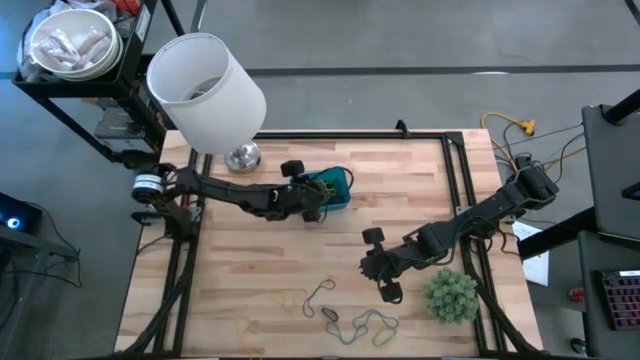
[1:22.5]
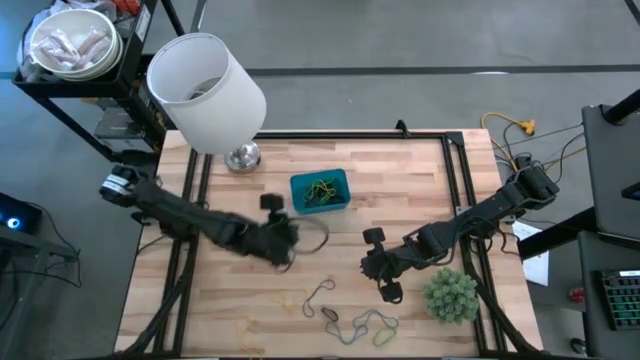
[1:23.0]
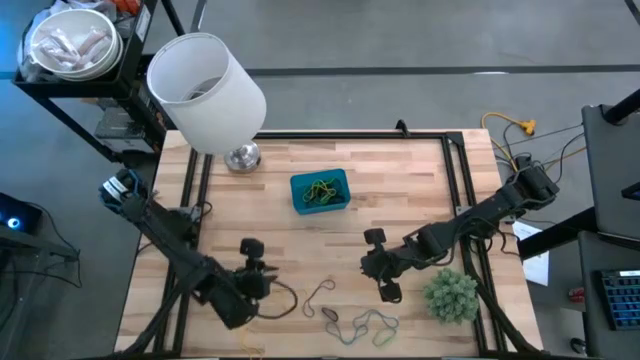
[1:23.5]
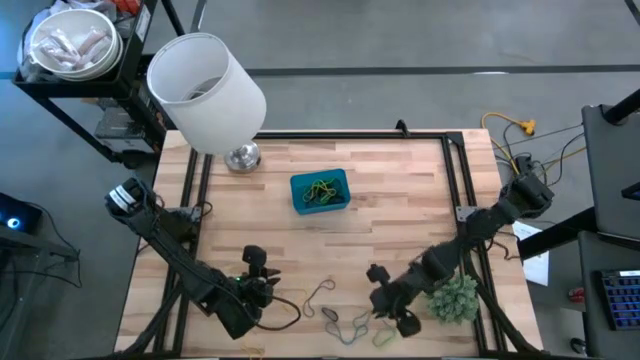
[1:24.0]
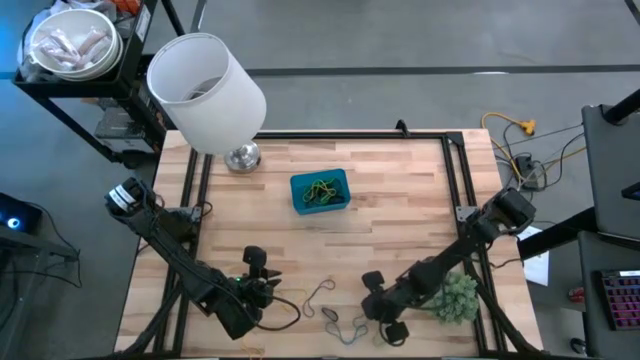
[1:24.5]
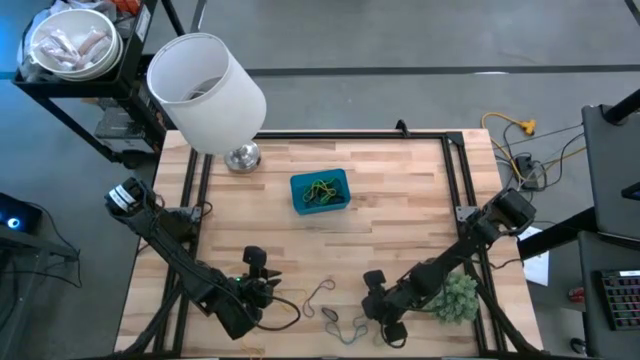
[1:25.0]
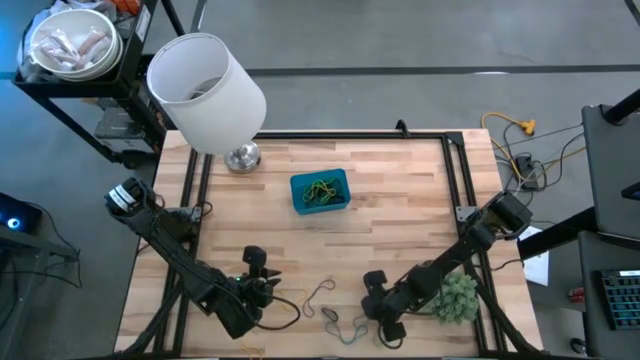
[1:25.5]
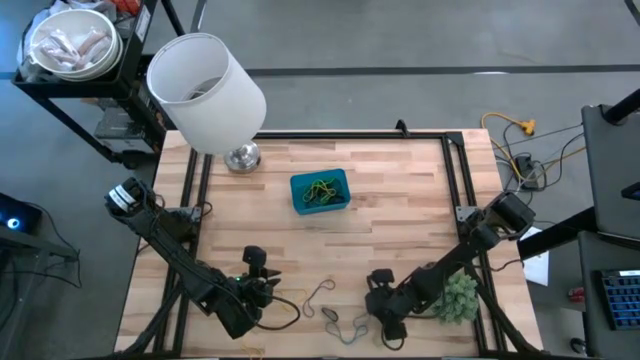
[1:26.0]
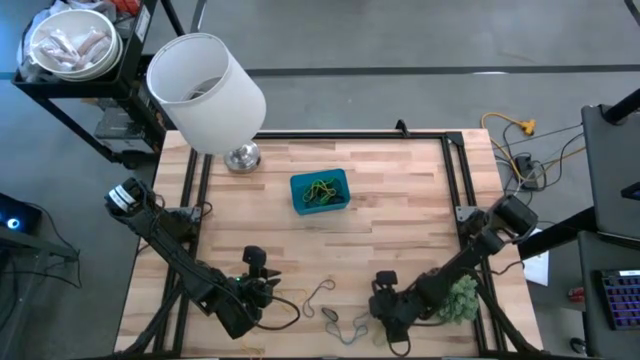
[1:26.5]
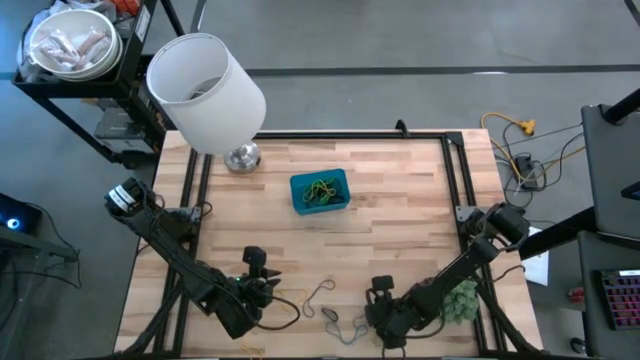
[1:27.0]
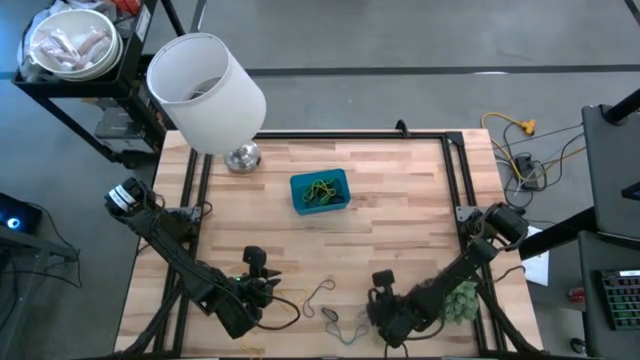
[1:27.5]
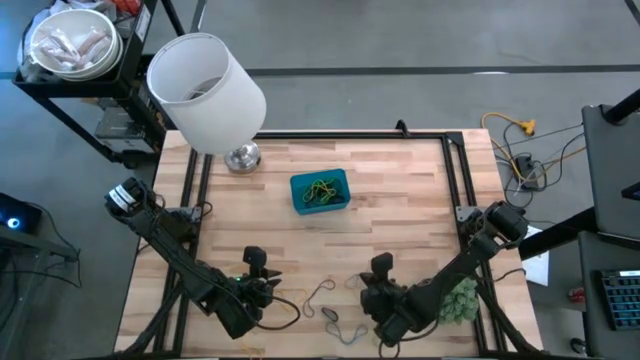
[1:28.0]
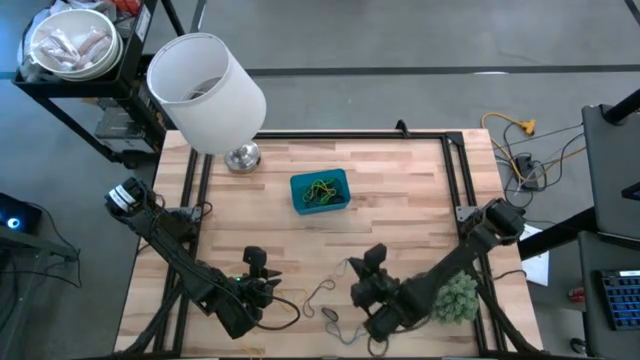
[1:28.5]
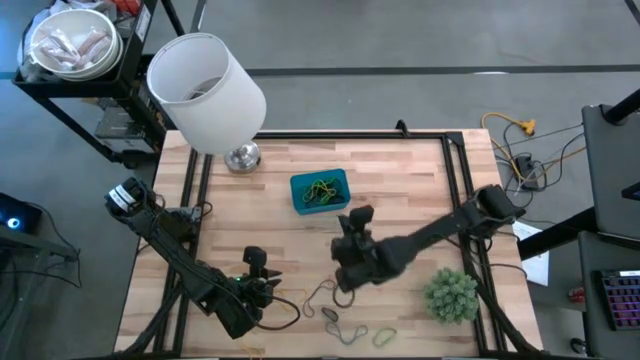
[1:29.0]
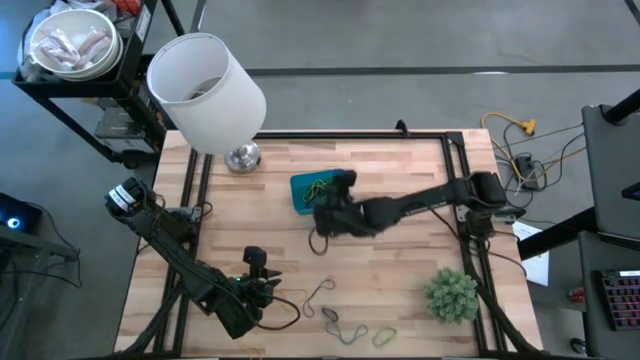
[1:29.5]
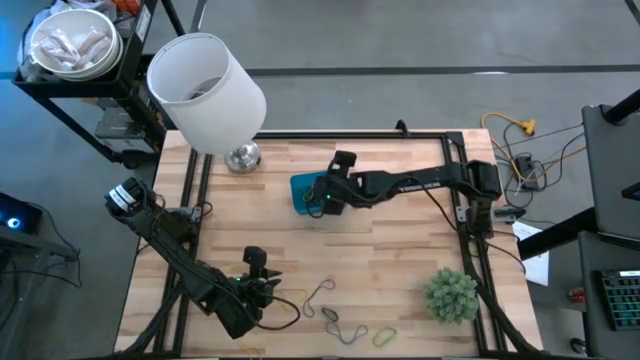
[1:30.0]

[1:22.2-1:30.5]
Task: Pick and place rubber bands into bin
Put the blue rubber band into the blue bin

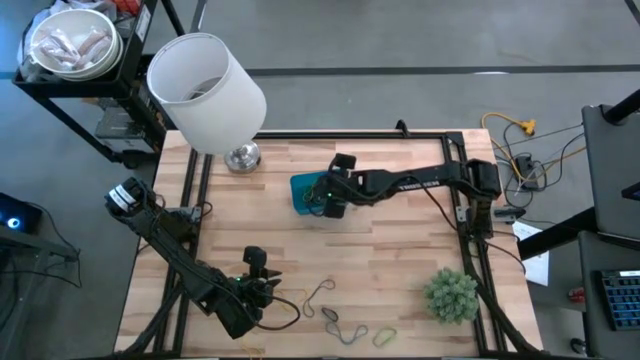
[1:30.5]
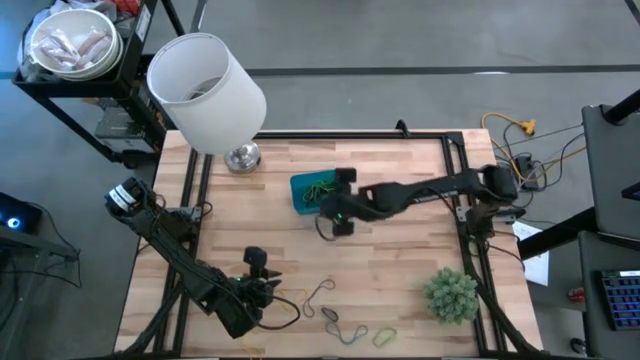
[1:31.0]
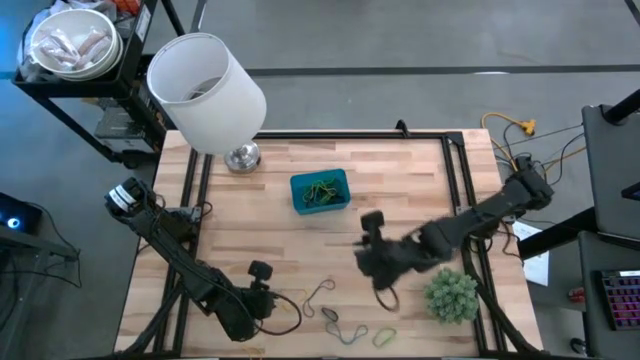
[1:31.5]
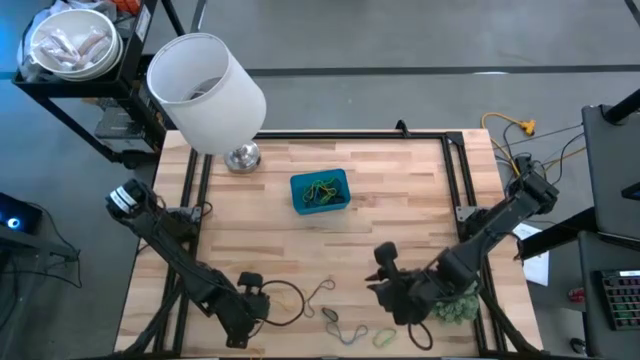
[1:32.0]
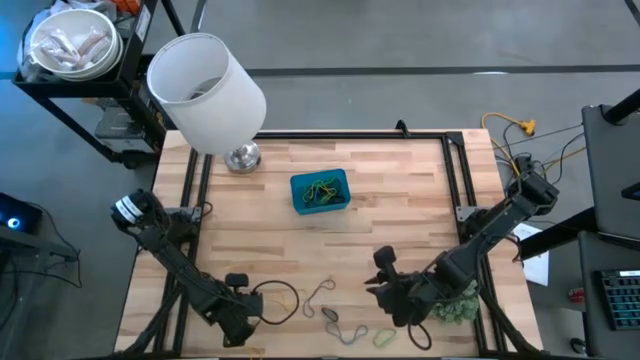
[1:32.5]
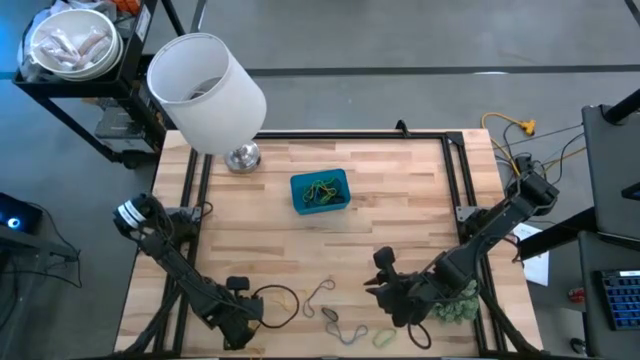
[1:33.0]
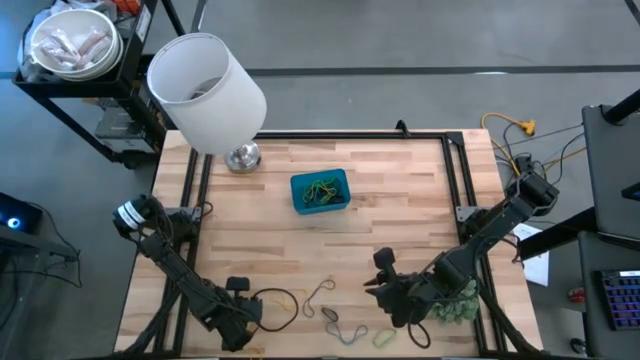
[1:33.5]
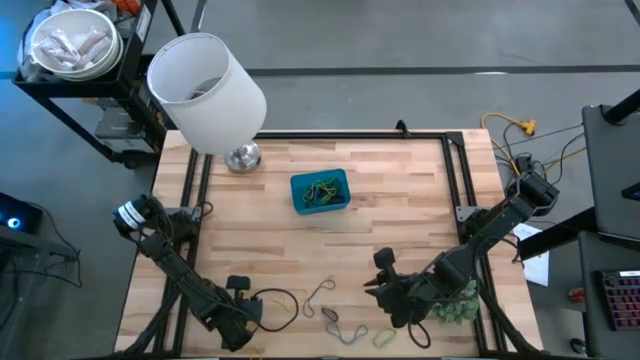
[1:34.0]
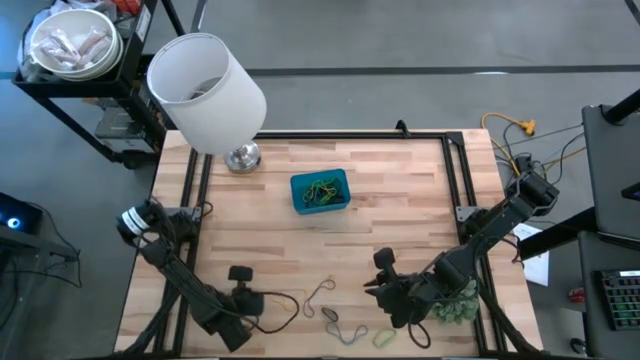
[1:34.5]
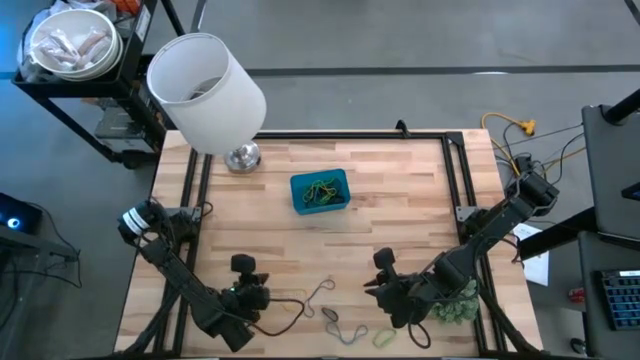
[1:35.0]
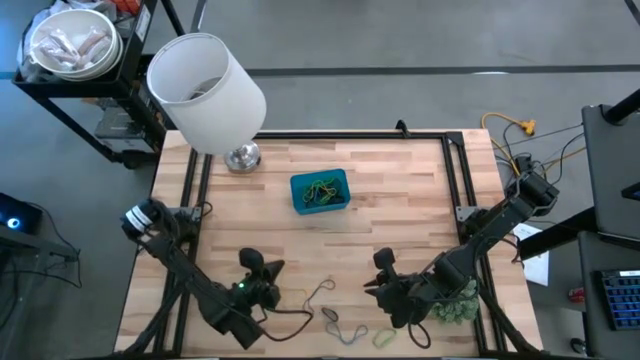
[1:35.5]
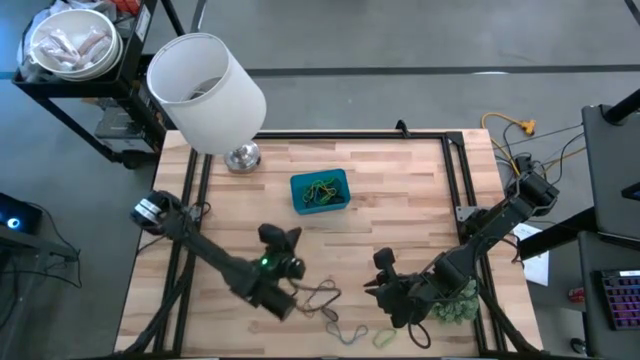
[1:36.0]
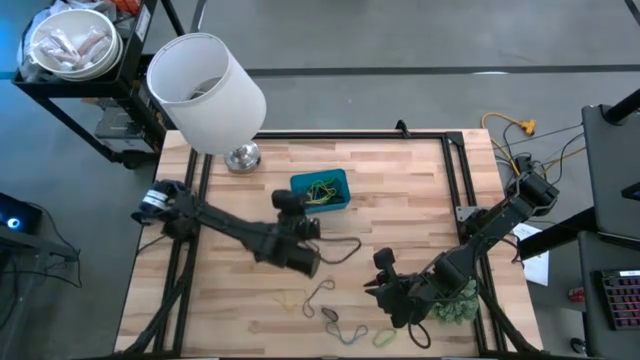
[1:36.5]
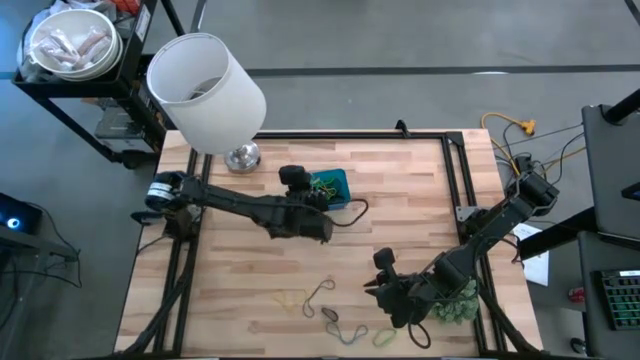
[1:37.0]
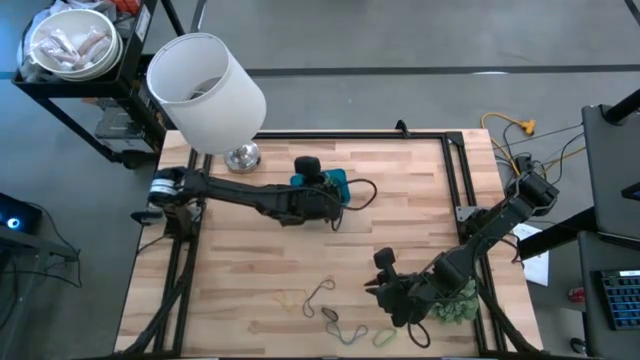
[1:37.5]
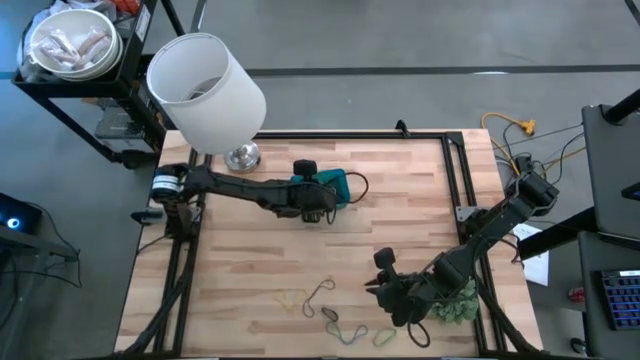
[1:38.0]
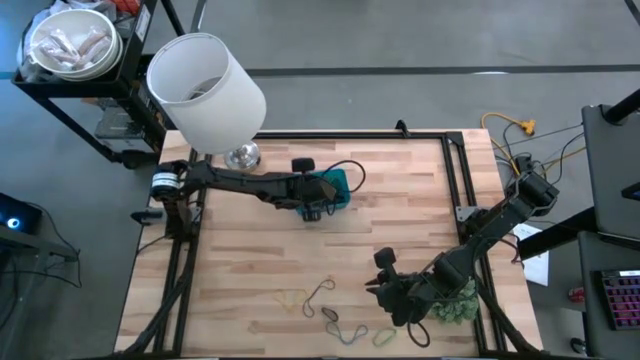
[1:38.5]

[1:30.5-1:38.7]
Put the yellow rubber band into the blue bin

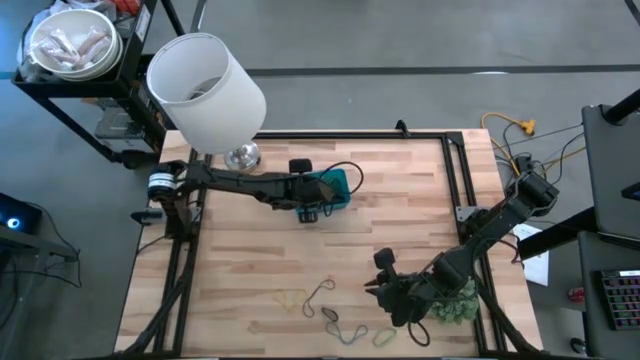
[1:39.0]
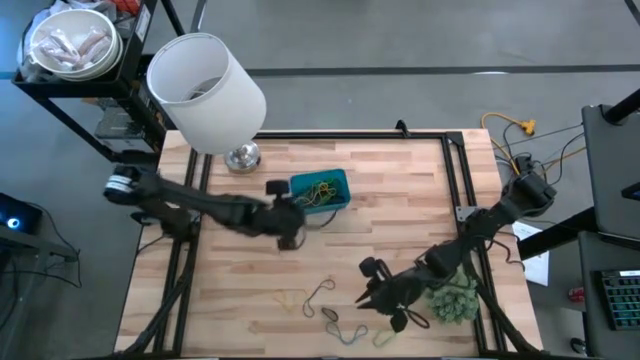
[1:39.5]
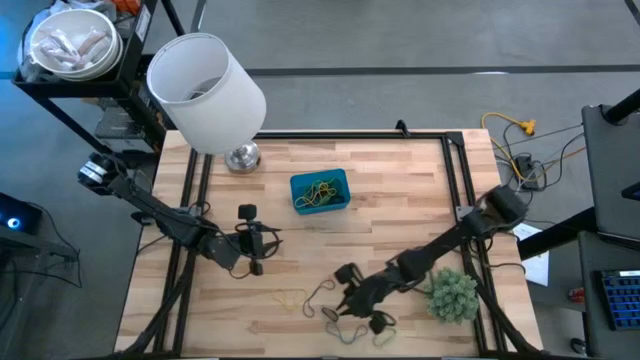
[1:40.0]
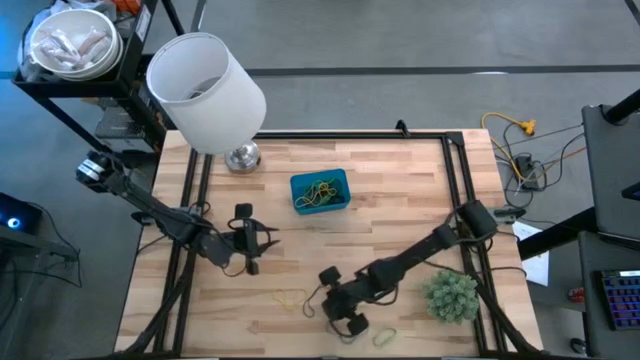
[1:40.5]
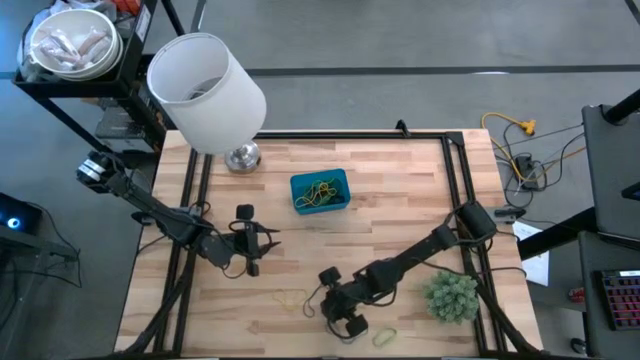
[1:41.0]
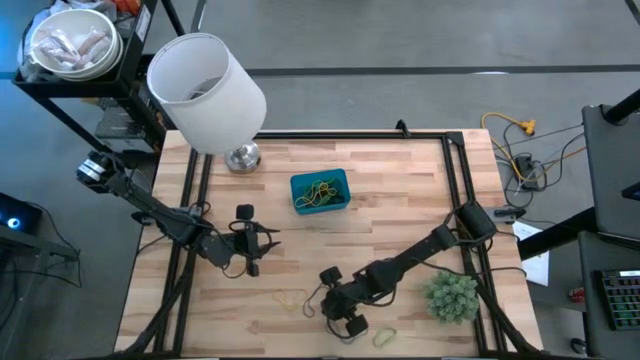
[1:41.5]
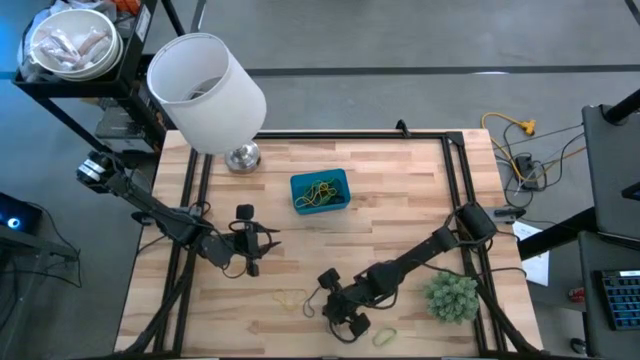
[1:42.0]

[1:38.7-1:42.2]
Put the black rubber band into the blue bin

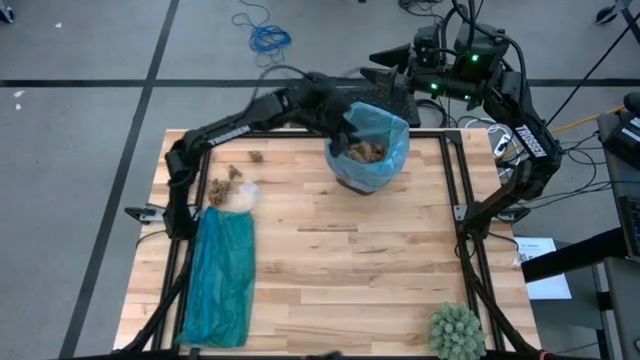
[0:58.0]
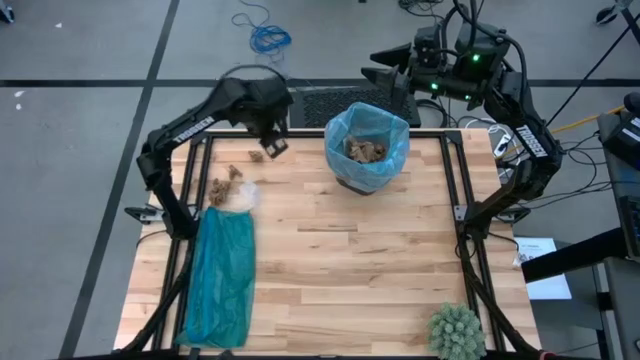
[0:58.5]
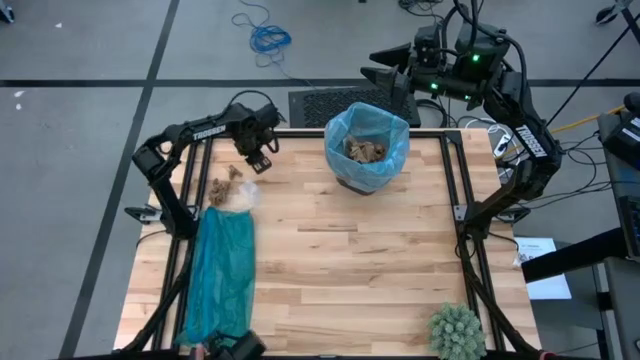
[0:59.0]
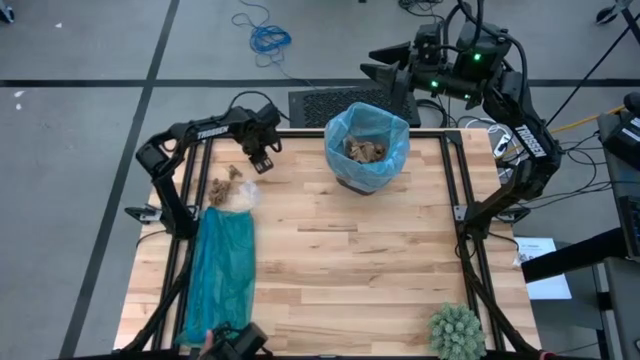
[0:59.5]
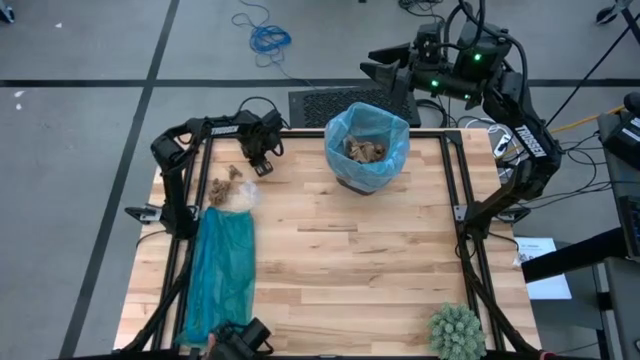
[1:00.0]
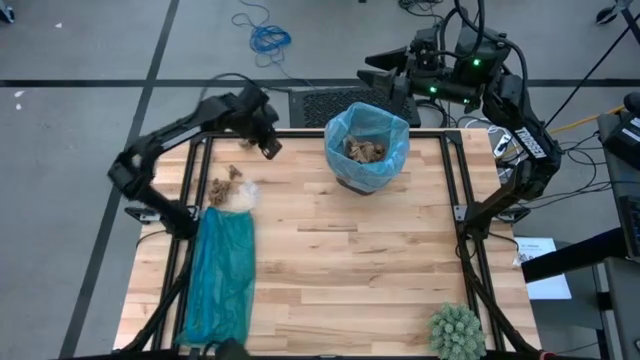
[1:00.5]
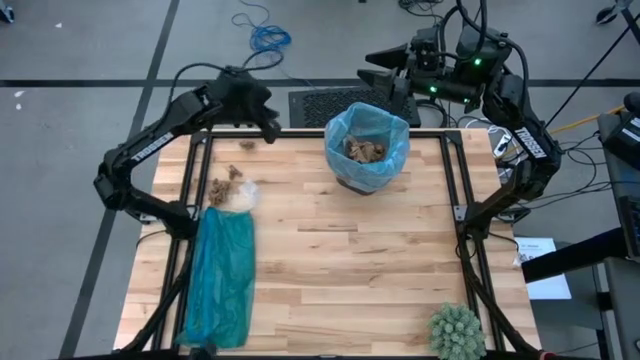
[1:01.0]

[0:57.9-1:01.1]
Task: place trash/remove bag and relplace
Put the brown napkin into the trash bin
